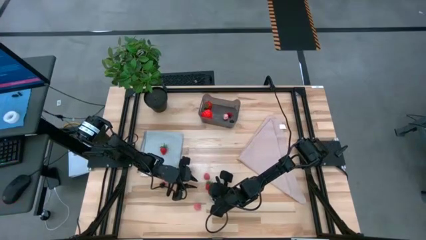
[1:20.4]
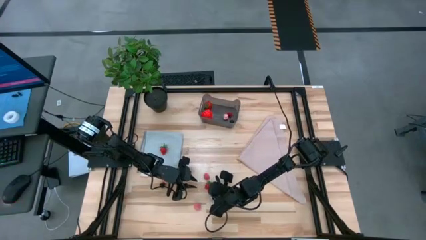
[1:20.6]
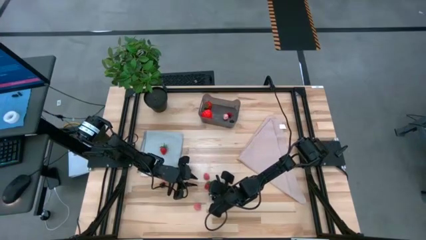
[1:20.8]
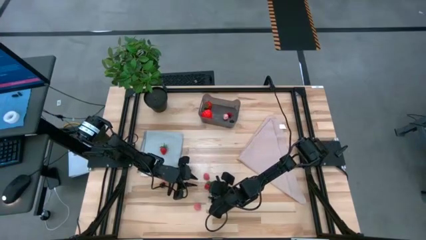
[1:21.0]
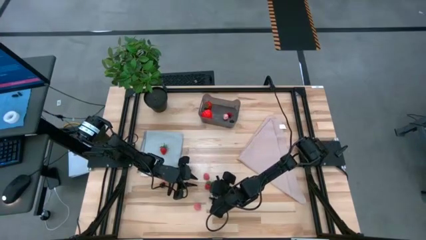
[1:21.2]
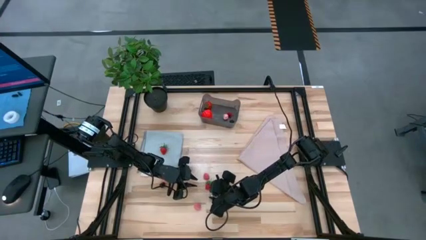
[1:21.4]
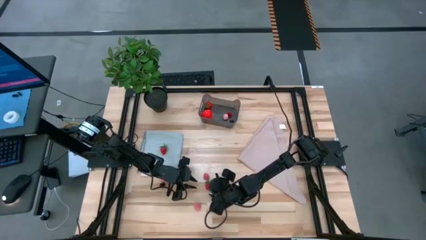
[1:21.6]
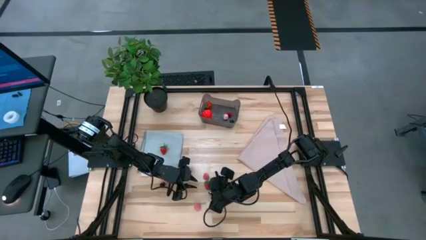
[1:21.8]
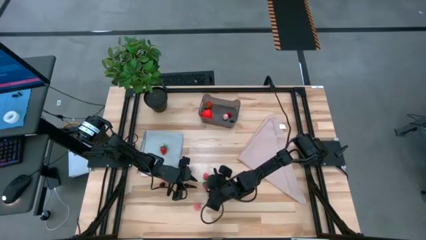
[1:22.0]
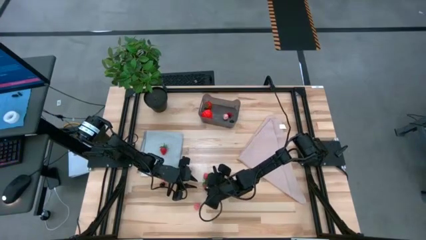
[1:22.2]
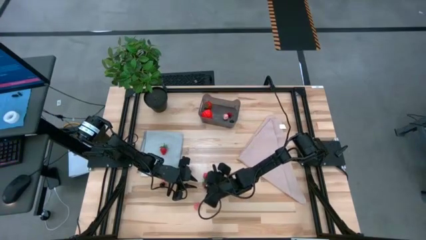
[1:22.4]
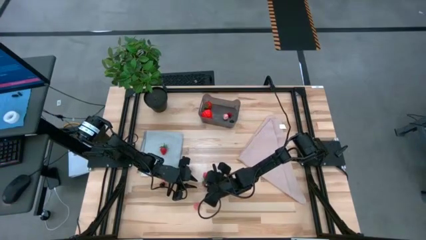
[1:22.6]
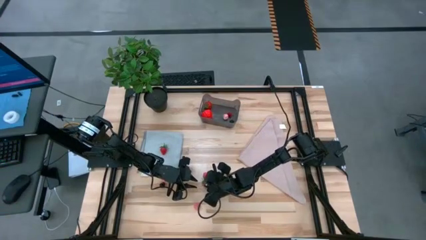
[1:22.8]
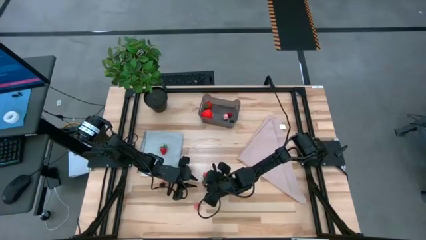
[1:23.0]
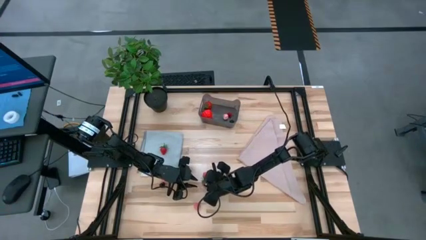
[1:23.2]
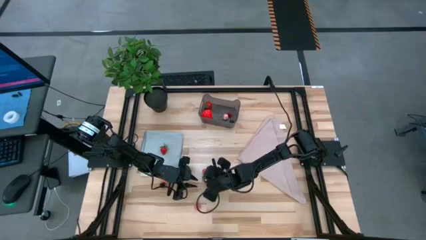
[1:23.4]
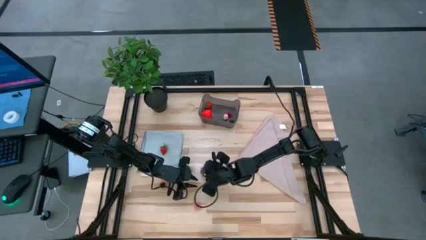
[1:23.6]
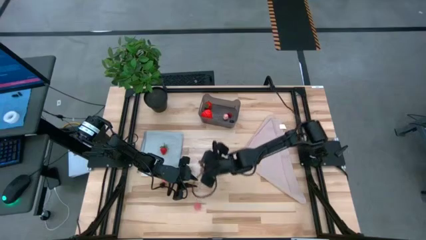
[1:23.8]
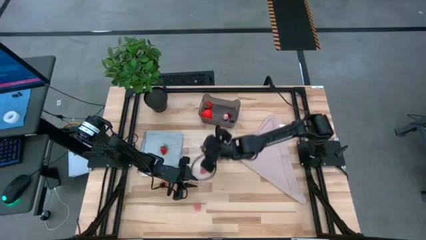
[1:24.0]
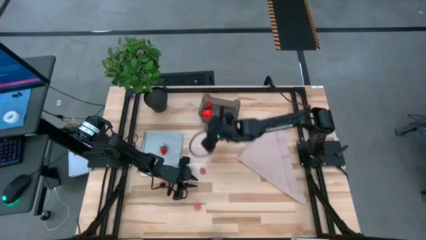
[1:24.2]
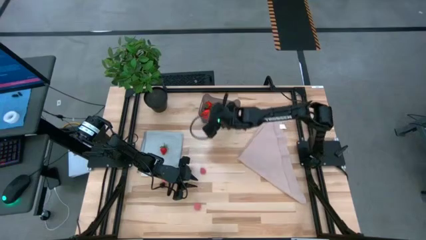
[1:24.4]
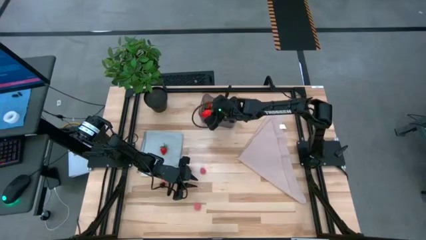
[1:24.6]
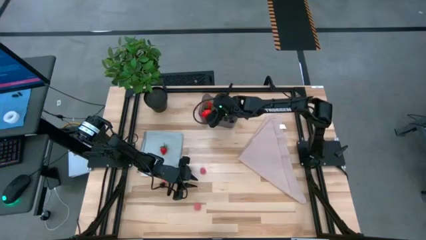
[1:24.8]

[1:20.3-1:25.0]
Task: Pick and placing Produce into tupperware
Put the strawberry into the black bin

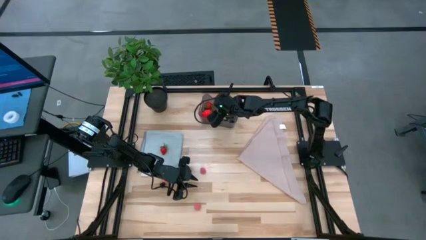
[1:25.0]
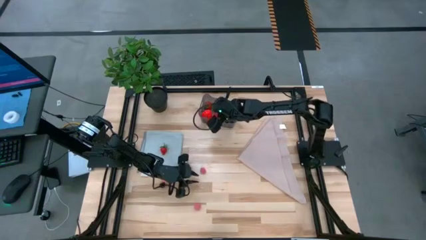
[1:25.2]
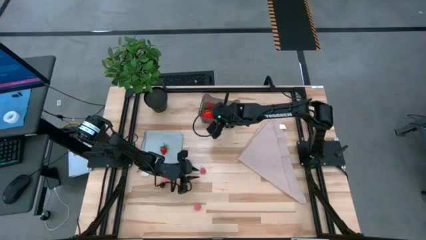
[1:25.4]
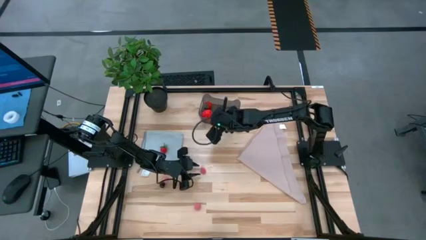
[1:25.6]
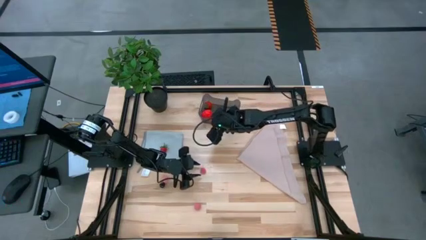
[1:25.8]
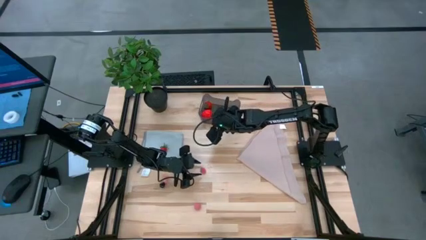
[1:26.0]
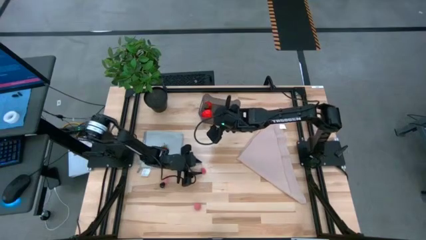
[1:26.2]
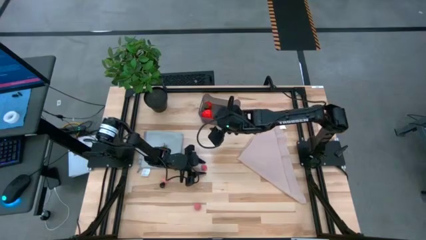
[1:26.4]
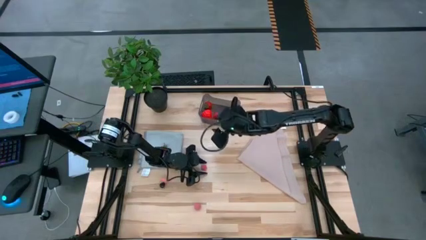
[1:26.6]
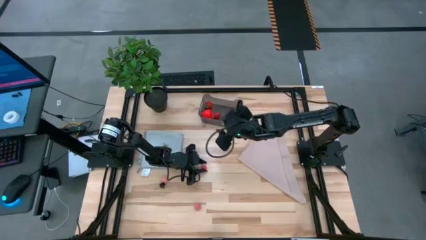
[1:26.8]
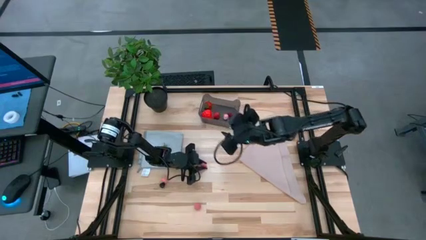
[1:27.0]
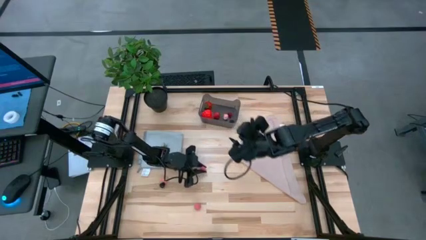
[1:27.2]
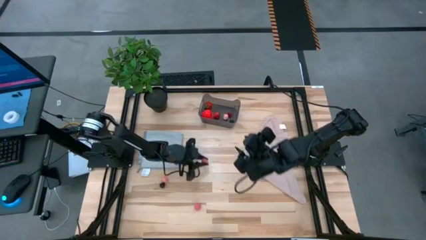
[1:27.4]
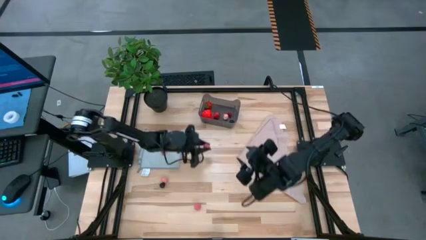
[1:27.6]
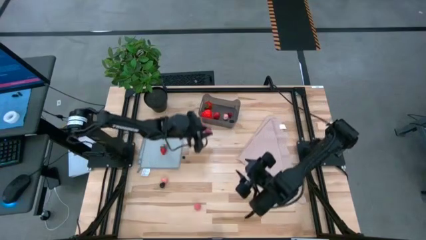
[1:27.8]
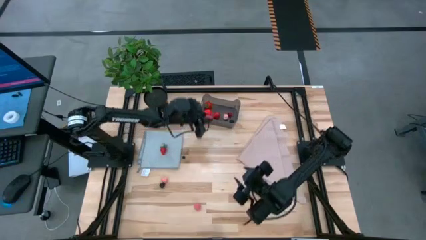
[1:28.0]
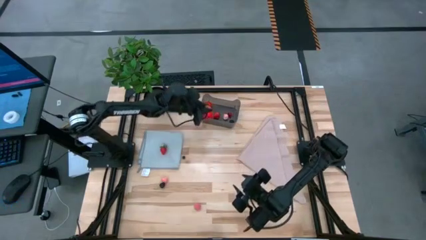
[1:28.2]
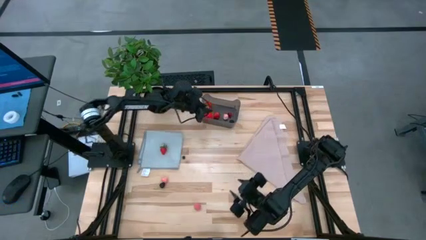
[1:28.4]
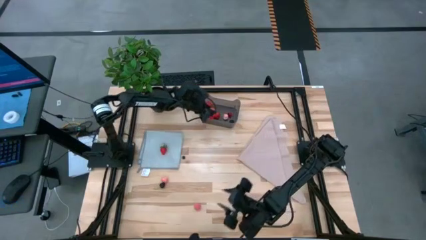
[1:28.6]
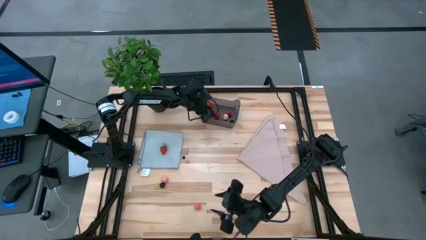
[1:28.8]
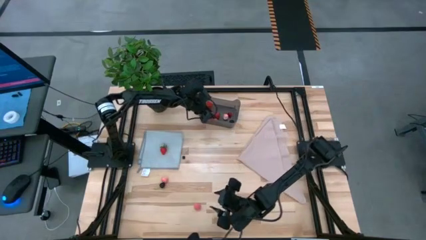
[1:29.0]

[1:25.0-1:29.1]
Put the peach into the black bin

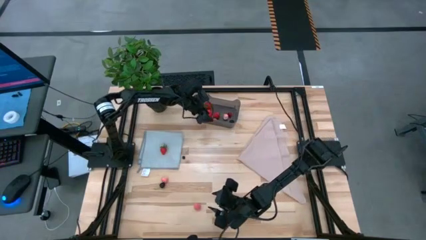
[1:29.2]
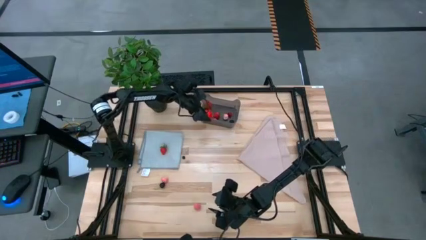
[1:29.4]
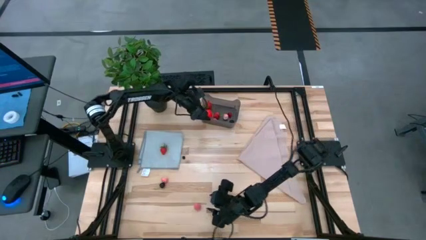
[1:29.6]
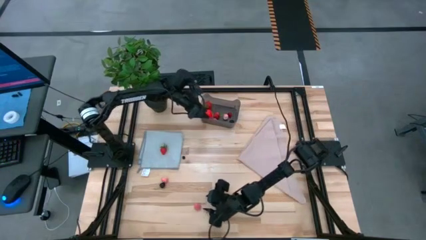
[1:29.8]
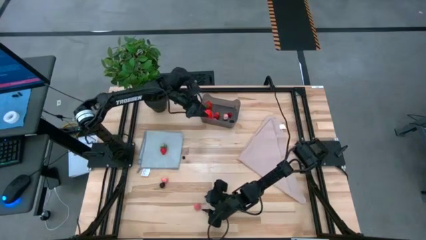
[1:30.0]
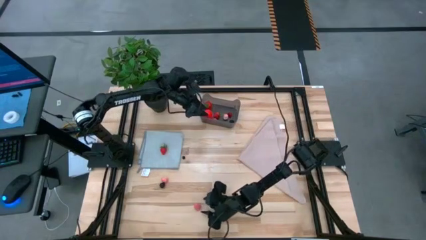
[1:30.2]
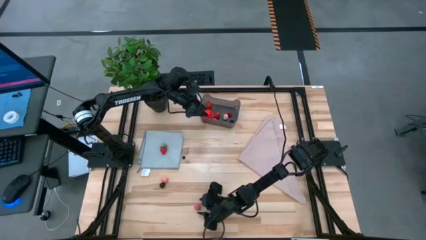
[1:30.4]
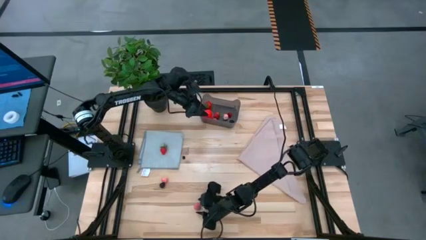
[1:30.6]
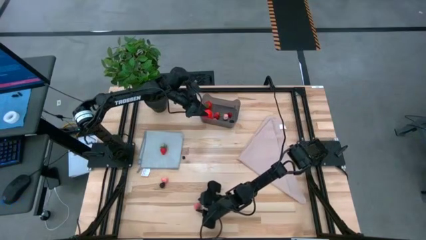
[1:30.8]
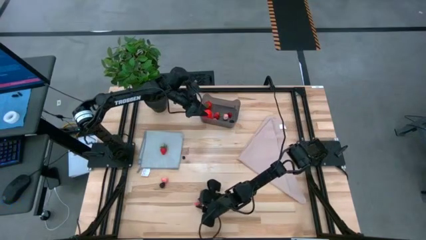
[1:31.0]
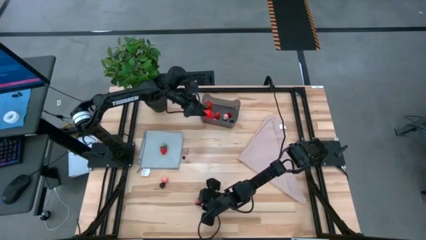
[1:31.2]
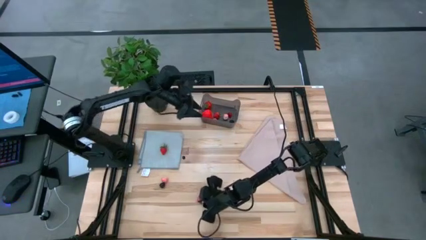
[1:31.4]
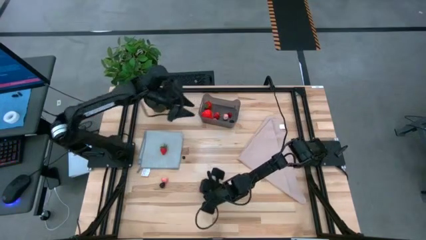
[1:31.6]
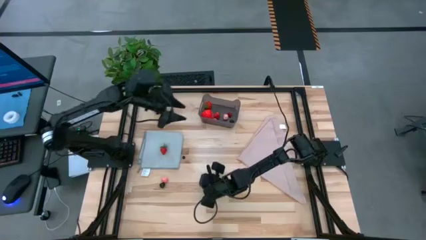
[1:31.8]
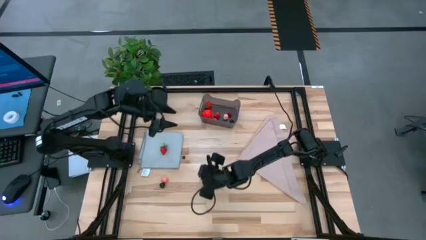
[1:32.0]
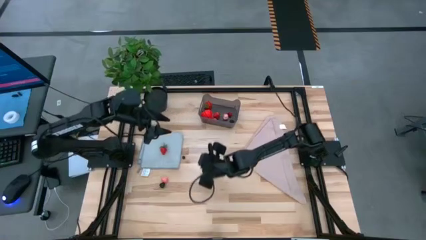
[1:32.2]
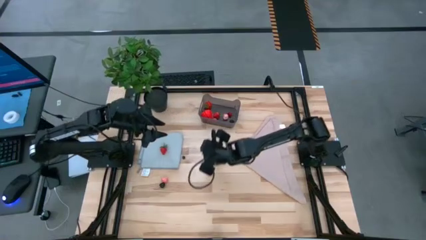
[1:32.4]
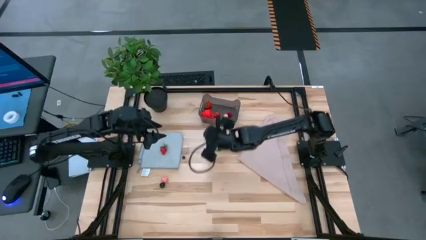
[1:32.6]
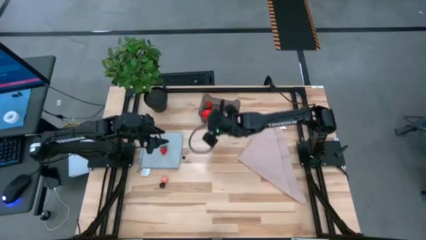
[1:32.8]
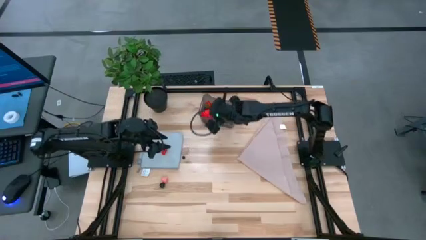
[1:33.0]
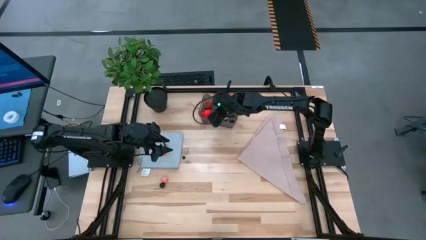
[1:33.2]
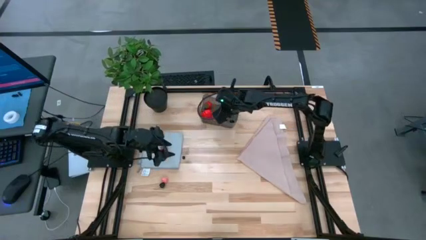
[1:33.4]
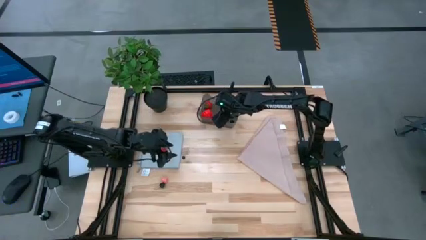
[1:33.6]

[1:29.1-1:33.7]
Put the peach into the black bin

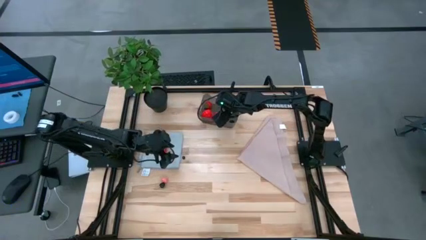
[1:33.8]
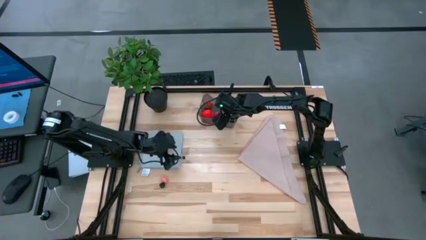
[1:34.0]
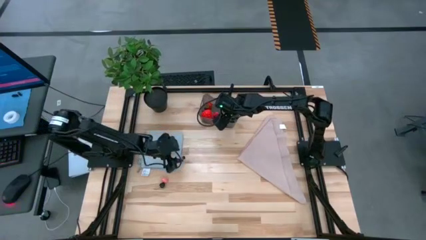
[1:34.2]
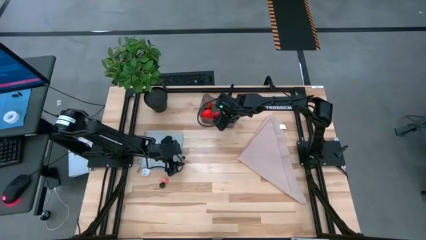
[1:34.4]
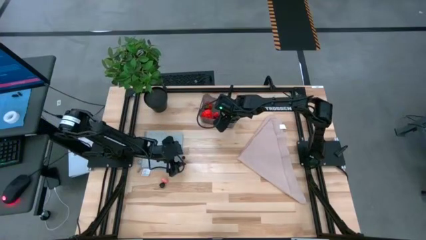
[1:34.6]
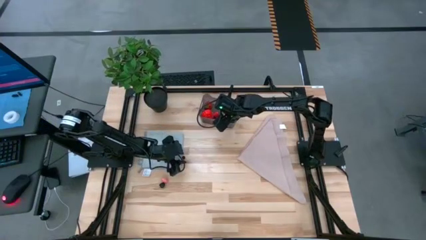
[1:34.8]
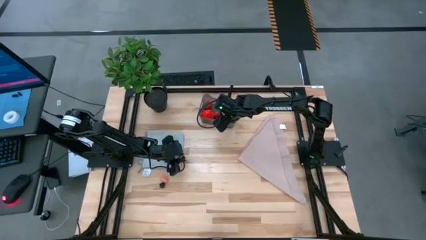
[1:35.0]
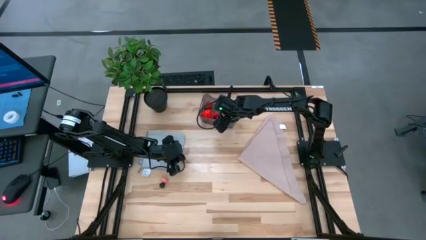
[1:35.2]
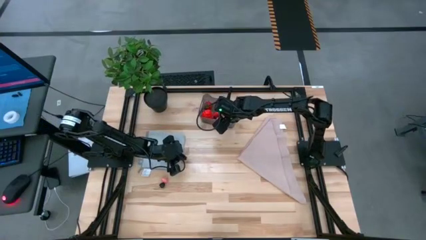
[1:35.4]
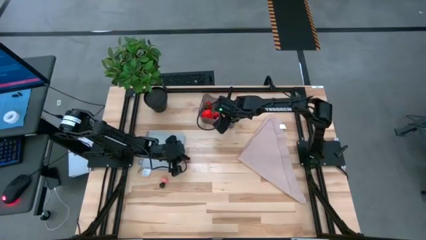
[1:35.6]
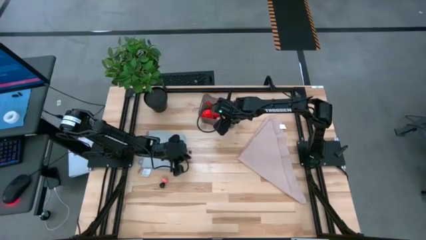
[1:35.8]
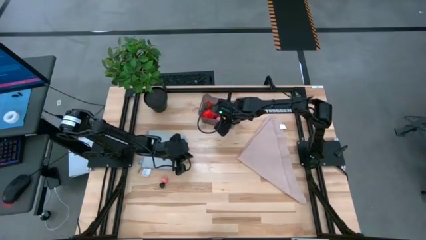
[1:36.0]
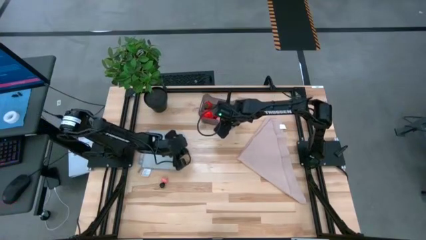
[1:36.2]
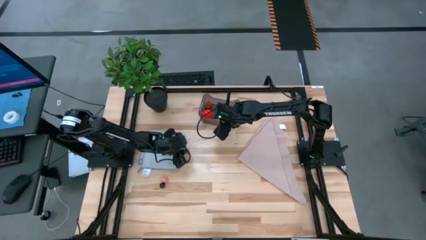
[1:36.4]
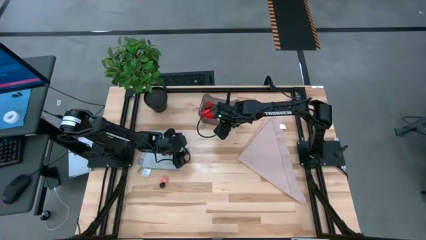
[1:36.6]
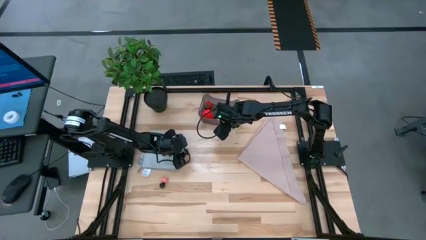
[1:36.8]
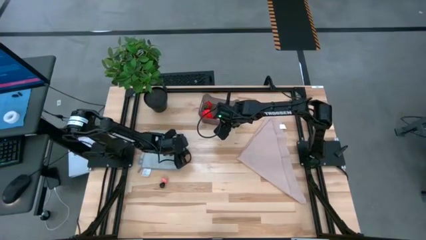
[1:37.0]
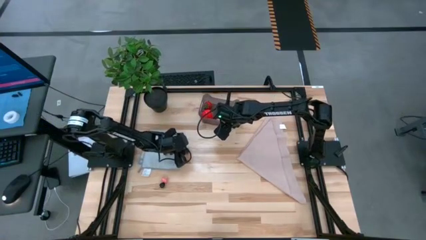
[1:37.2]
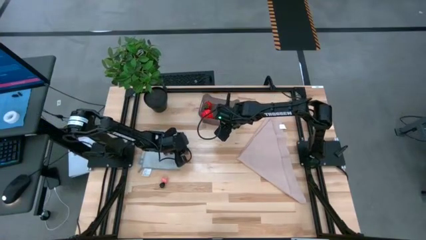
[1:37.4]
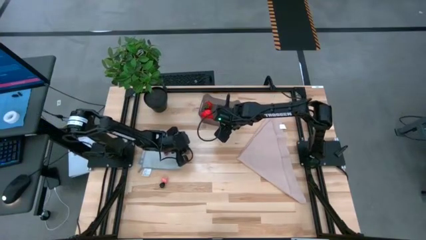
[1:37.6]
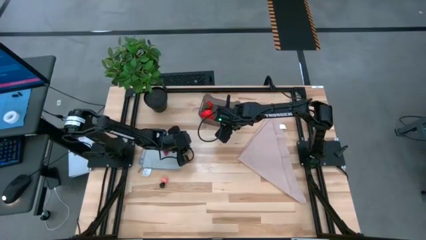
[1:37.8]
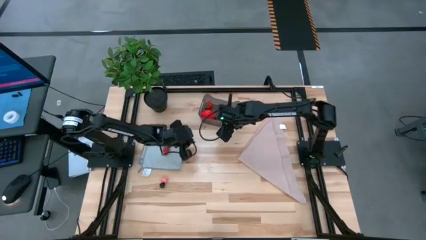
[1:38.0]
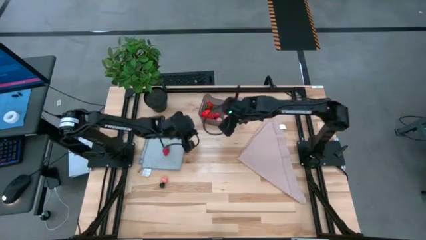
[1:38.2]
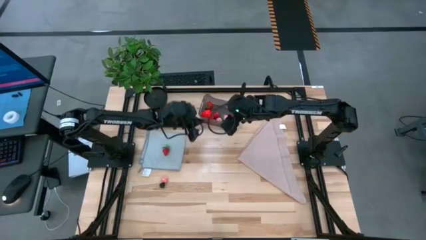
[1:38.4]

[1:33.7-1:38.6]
Put the blueberry into the black bin
